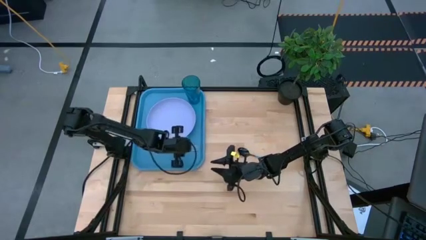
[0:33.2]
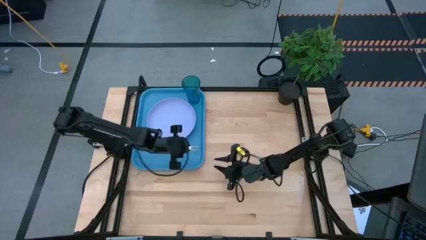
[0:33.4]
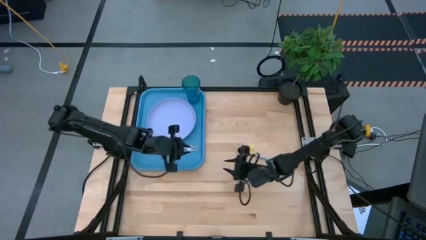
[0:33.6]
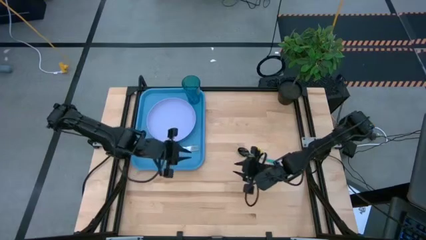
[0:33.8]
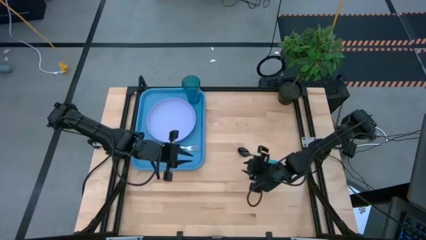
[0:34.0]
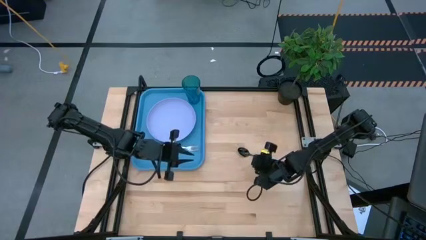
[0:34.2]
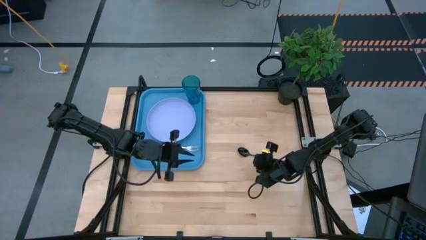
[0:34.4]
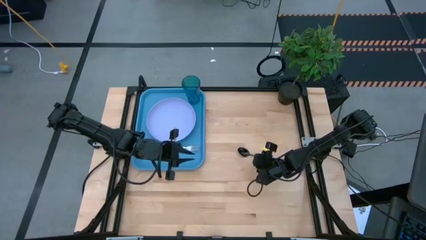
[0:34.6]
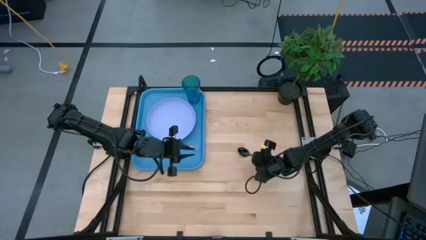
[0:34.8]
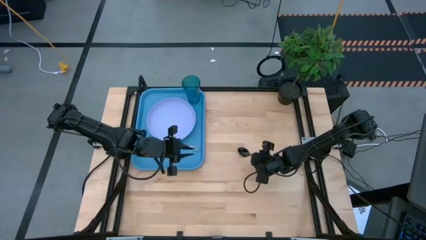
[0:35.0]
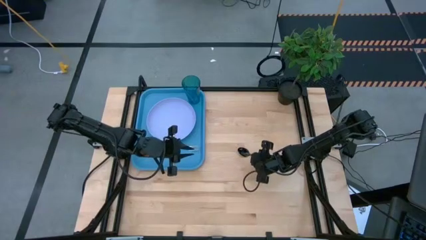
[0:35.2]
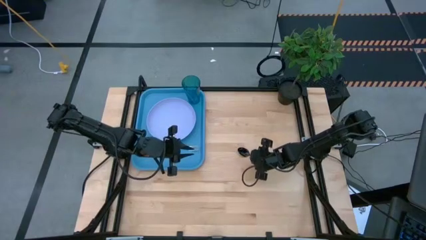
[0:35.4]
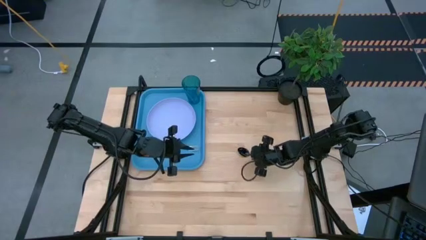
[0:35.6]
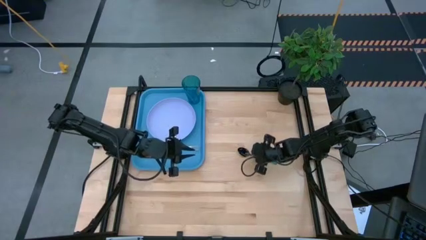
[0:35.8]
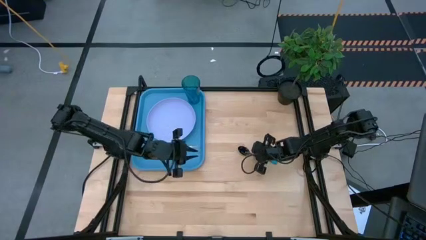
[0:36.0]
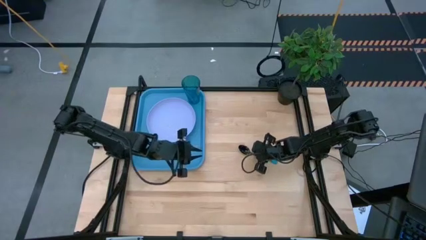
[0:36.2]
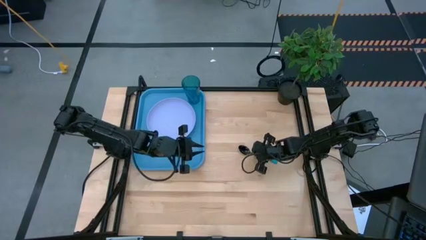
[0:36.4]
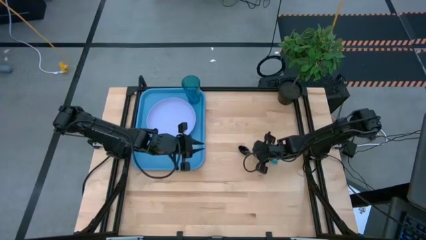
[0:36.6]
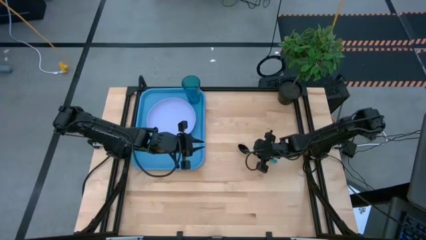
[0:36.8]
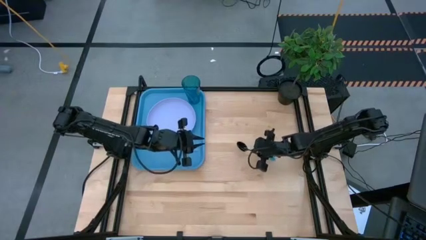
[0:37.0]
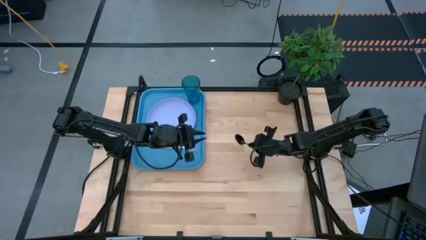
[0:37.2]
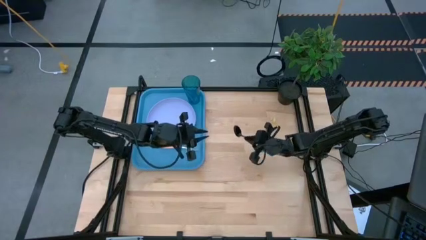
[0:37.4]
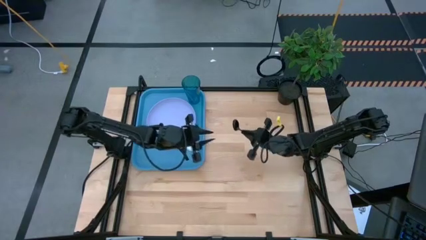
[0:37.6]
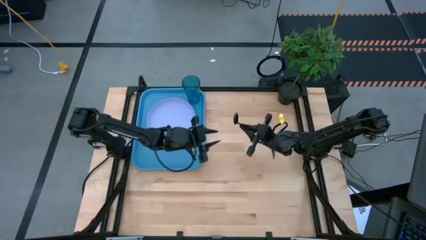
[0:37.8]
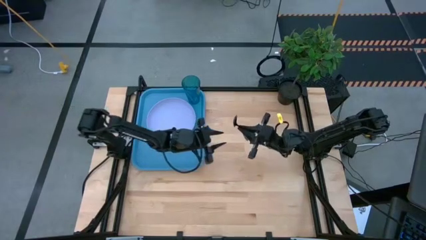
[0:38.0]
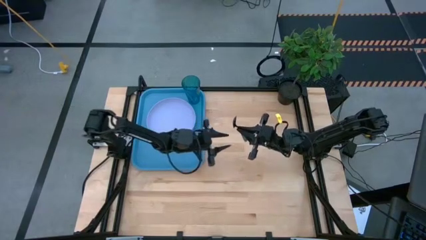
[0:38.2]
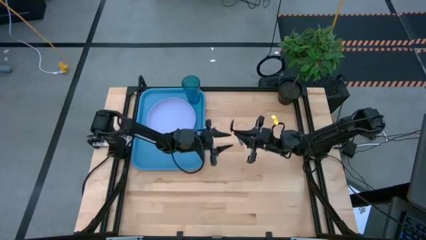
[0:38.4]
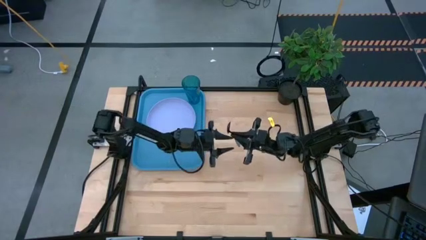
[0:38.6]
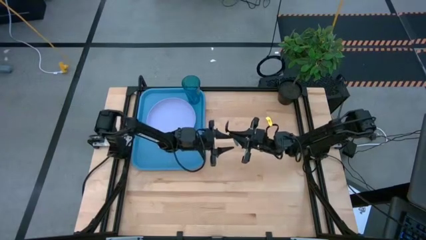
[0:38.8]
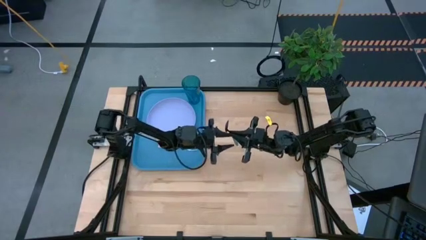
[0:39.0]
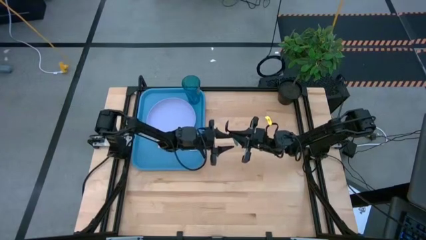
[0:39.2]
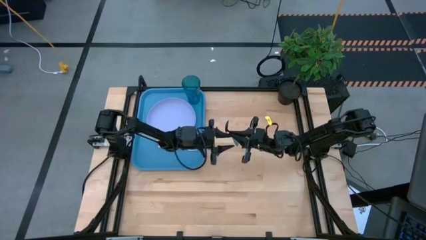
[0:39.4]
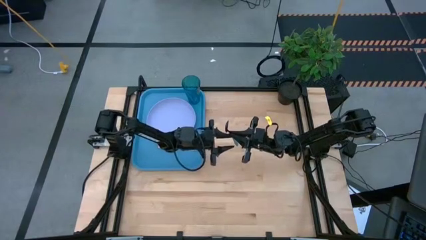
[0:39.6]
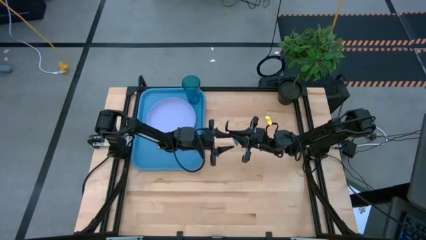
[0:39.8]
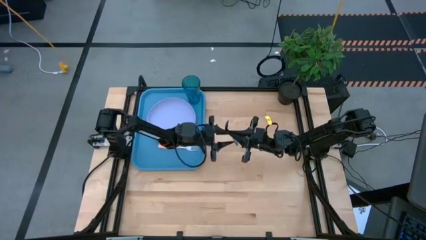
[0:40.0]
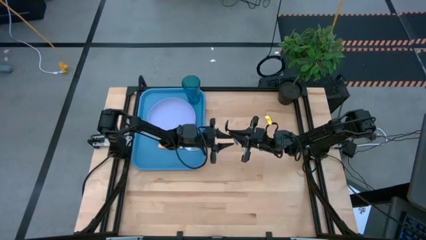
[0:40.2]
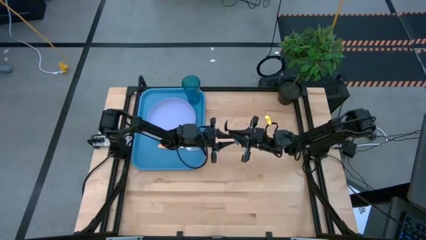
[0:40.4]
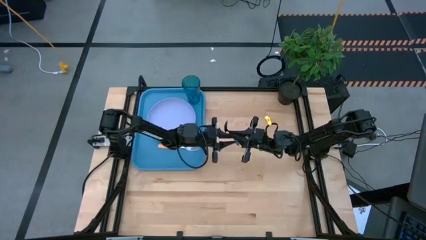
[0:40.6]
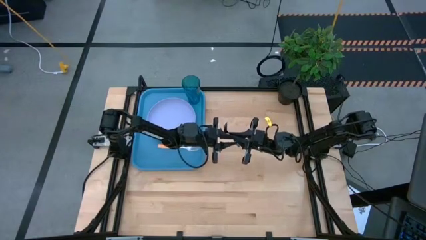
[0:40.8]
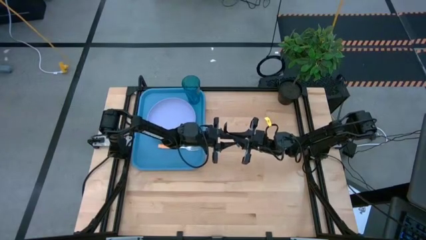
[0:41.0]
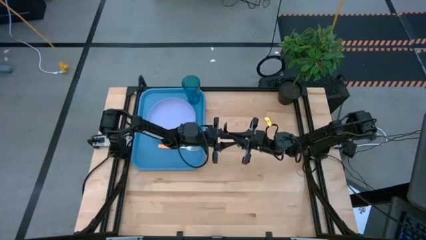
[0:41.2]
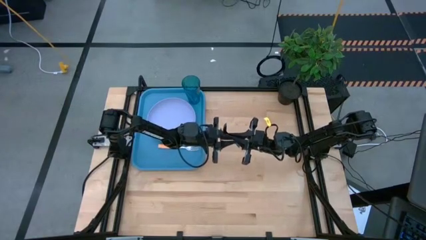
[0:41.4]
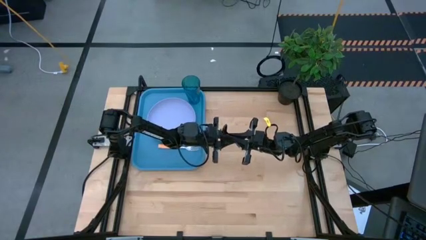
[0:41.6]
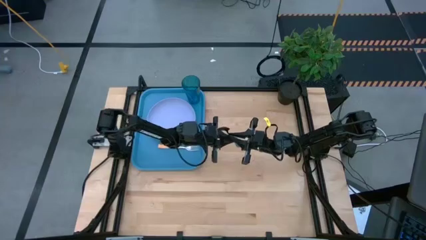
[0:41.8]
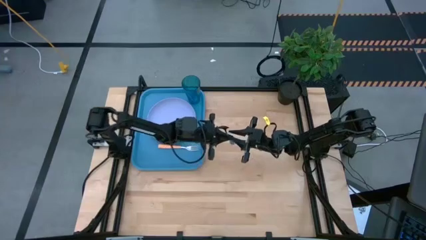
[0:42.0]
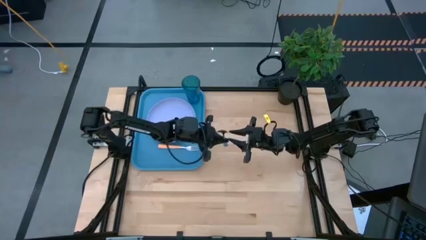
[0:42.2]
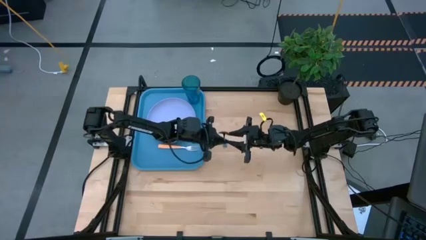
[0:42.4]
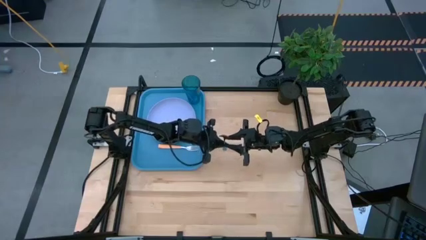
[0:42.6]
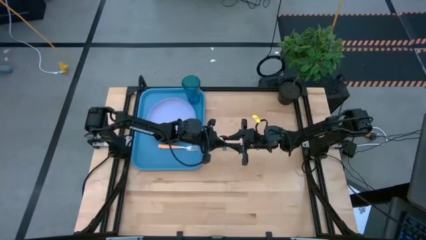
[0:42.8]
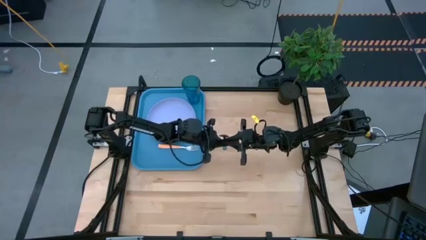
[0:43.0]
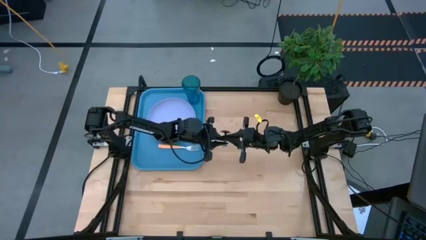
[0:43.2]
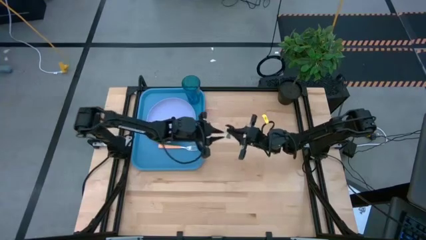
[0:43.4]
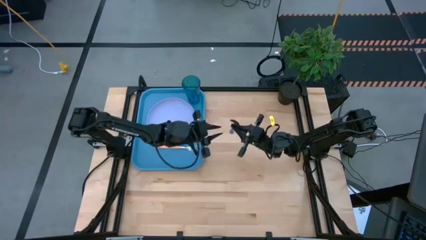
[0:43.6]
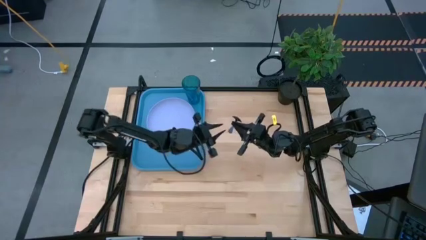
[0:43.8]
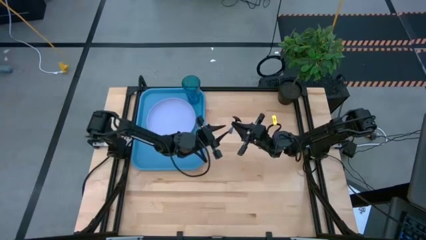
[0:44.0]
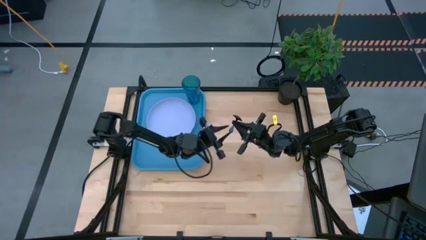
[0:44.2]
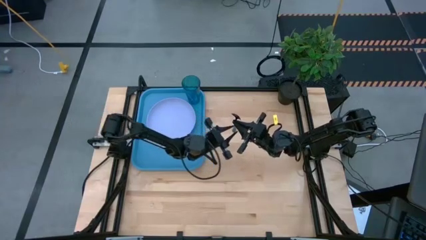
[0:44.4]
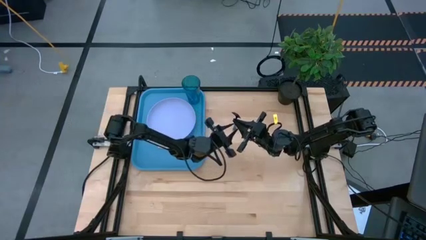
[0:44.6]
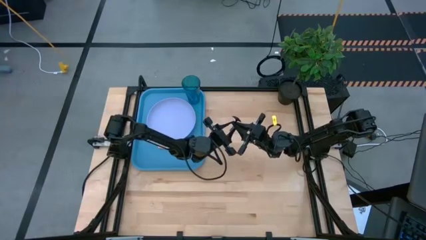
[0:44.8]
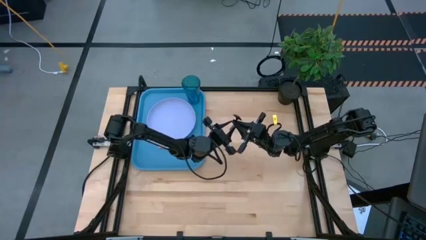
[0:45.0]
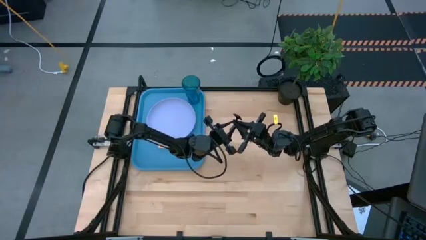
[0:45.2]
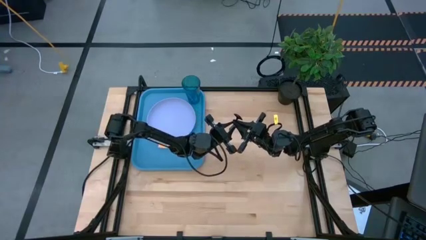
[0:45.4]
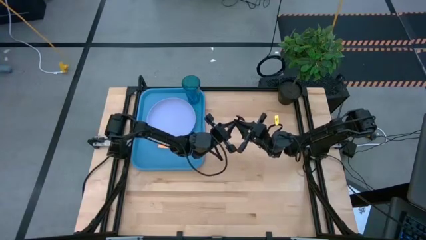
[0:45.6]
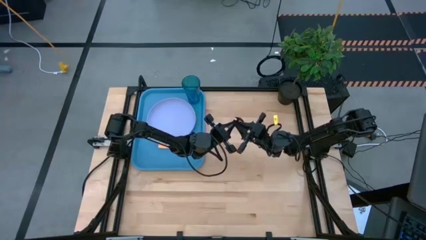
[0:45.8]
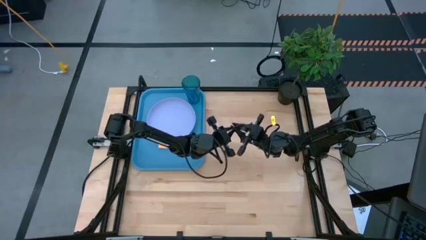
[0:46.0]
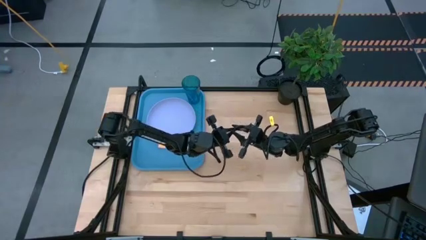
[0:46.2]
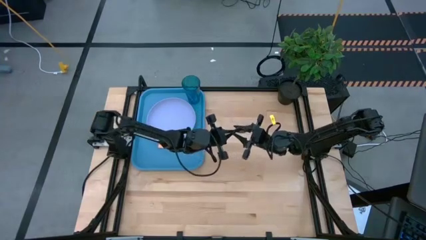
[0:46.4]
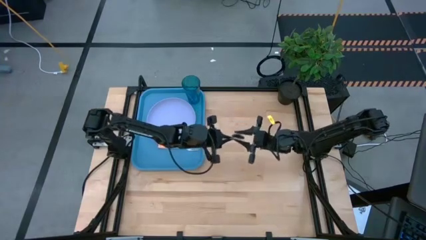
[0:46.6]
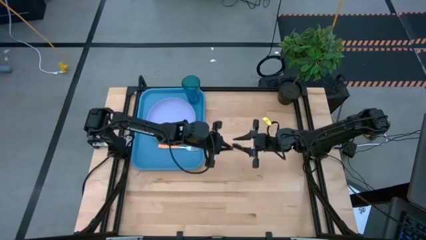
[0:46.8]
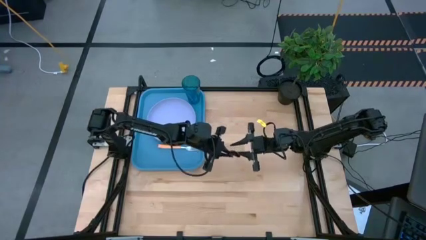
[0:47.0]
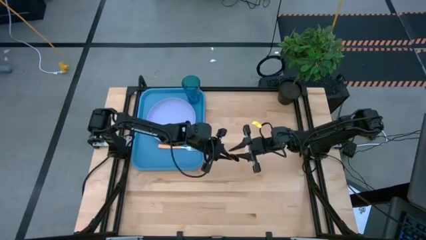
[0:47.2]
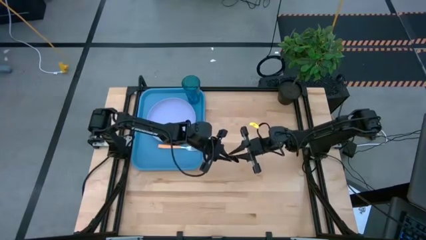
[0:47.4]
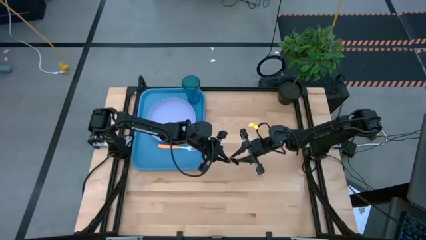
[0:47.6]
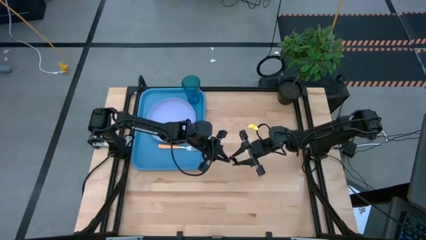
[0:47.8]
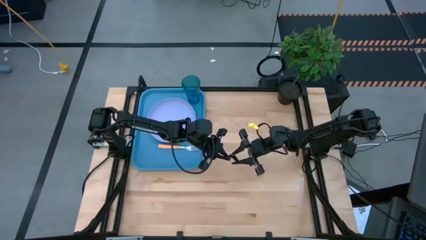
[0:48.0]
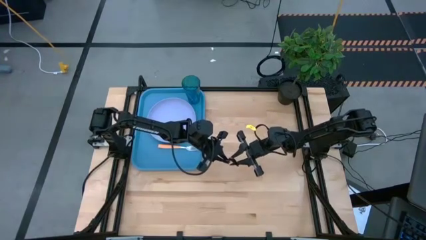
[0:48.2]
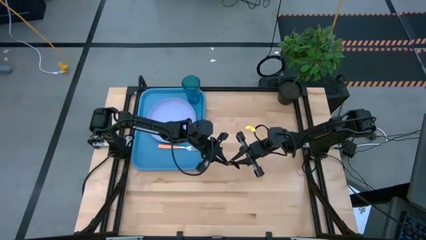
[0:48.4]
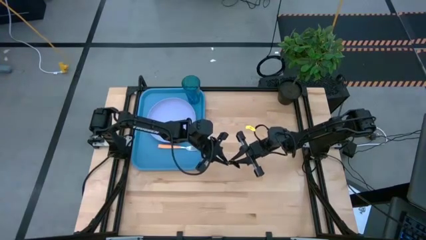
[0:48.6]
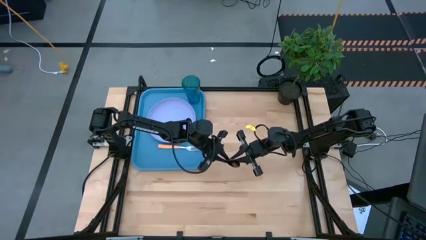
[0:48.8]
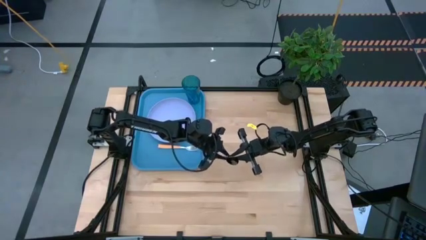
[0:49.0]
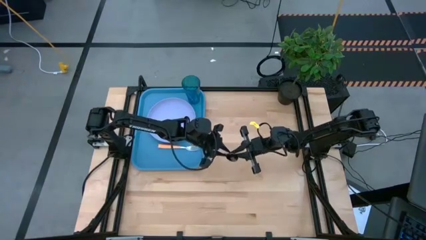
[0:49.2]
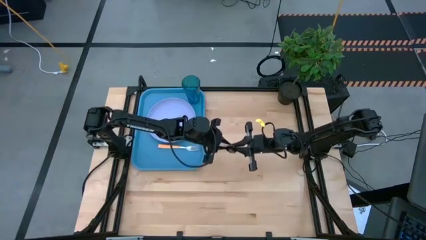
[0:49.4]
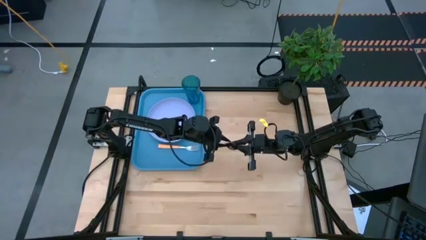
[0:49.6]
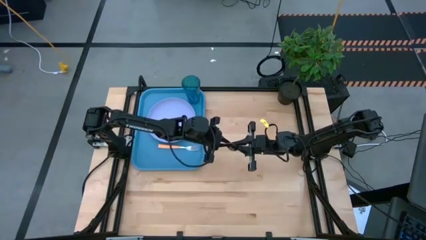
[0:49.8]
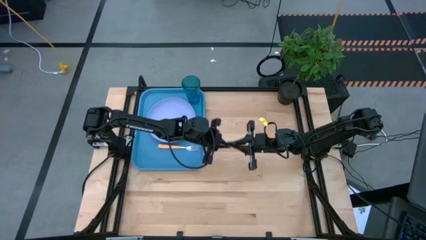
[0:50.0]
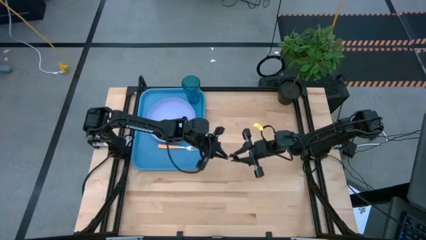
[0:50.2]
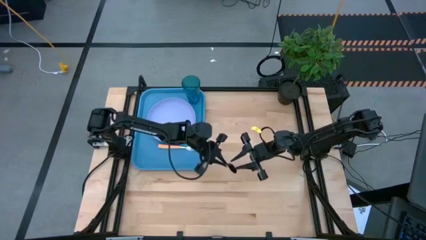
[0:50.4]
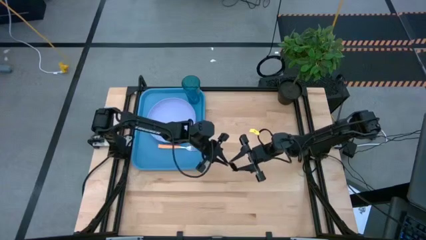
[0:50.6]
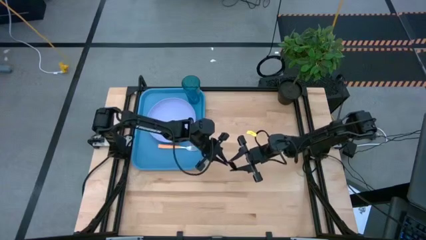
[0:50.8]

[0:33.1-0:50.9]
Task: Pick and place plate/cup/fork/spoon on tray
Put the blue spoon on the blue tray
